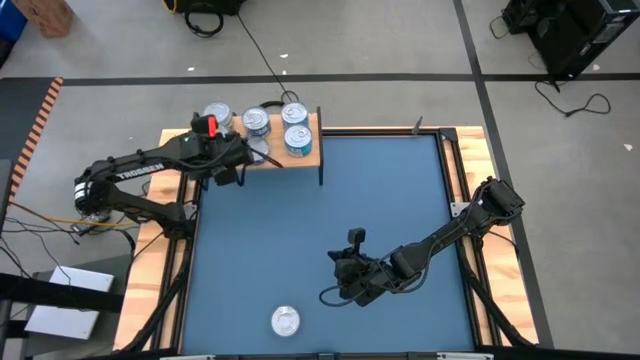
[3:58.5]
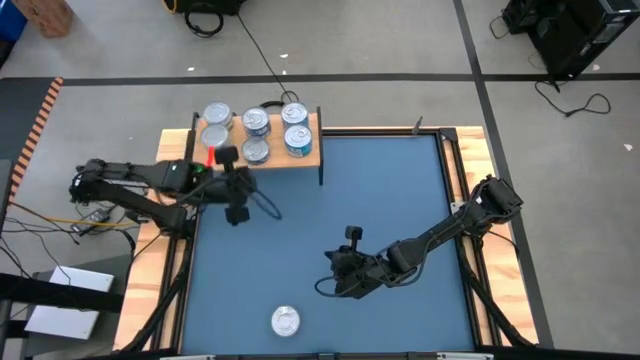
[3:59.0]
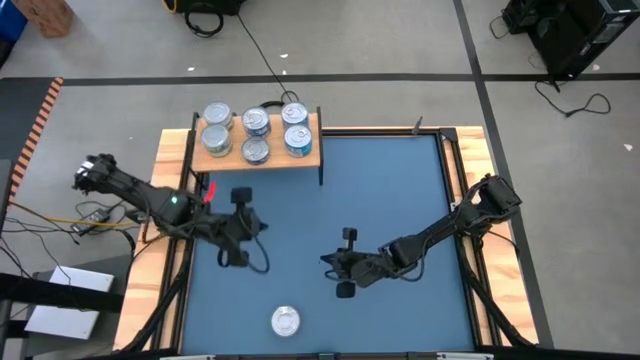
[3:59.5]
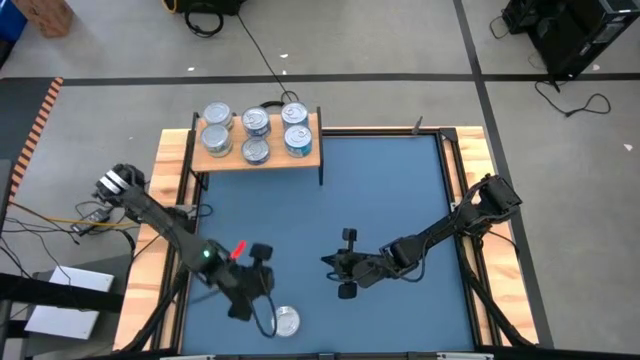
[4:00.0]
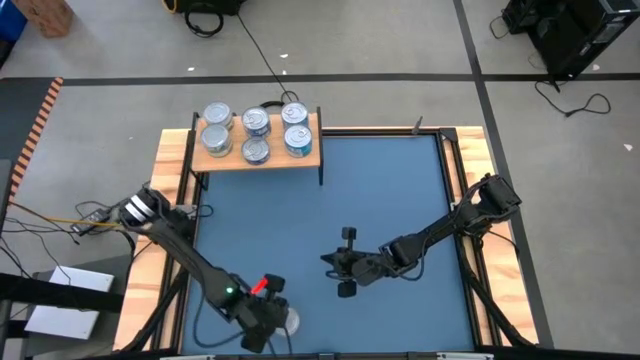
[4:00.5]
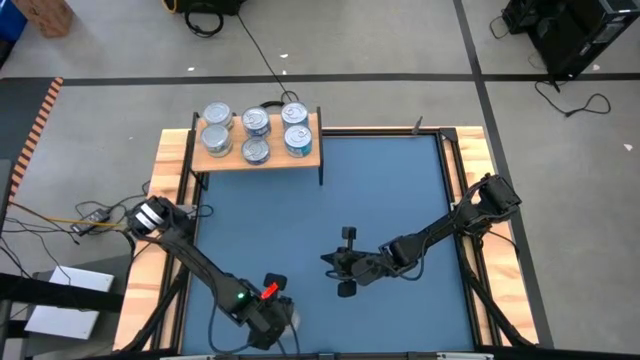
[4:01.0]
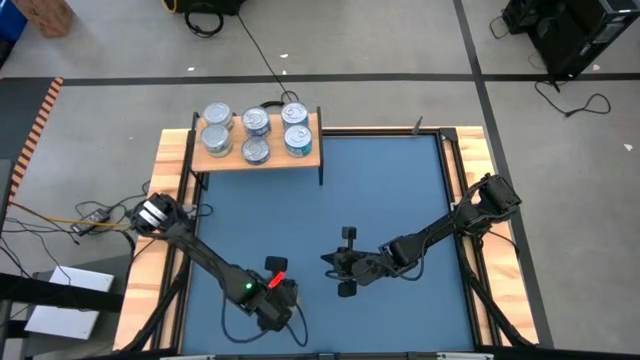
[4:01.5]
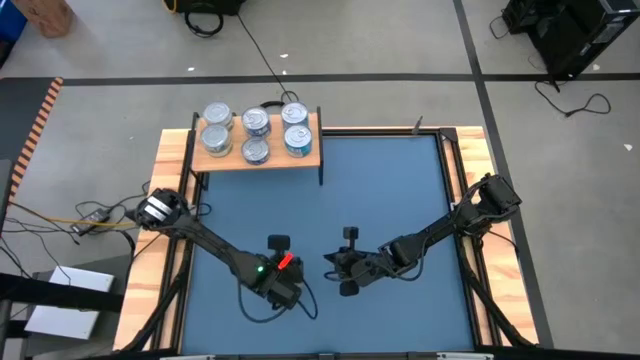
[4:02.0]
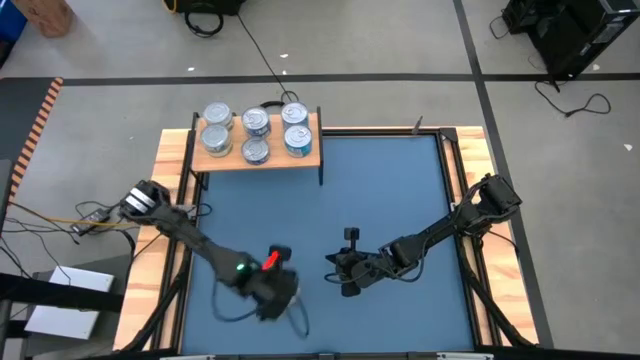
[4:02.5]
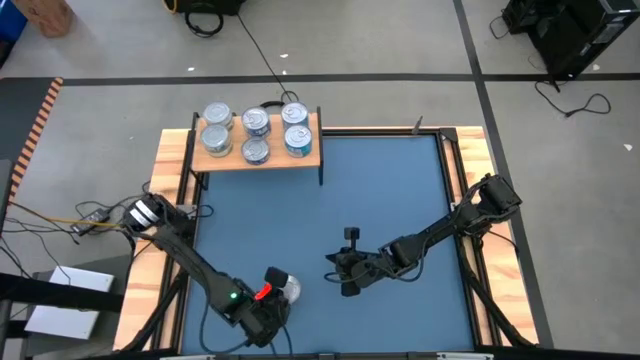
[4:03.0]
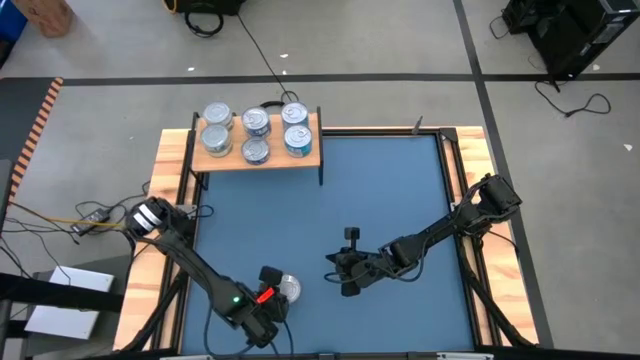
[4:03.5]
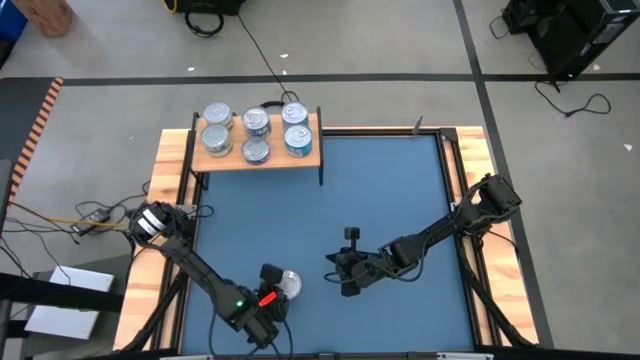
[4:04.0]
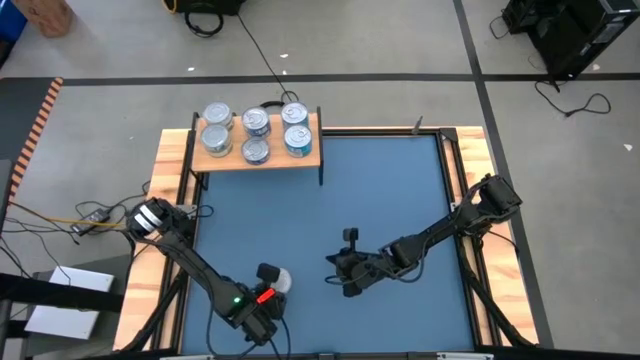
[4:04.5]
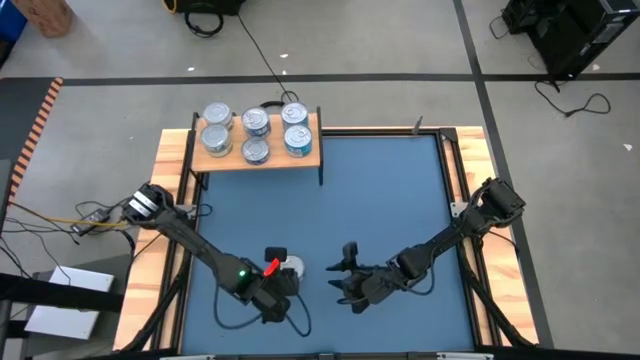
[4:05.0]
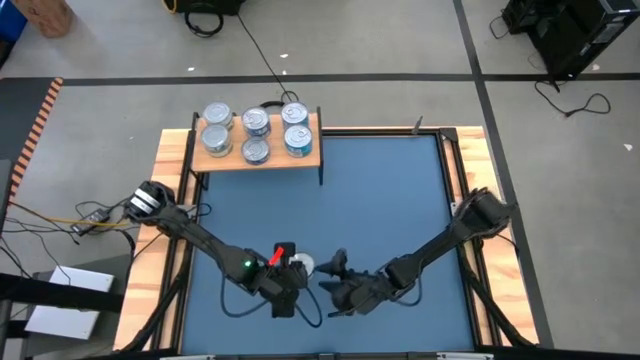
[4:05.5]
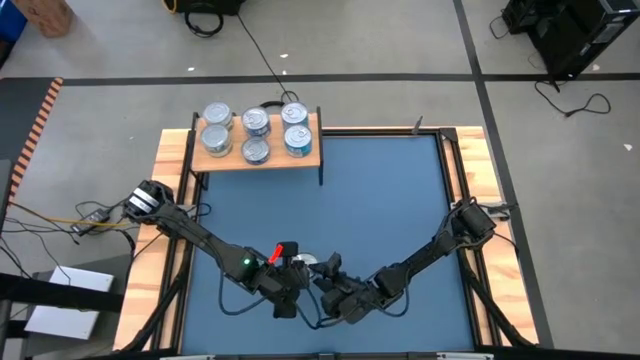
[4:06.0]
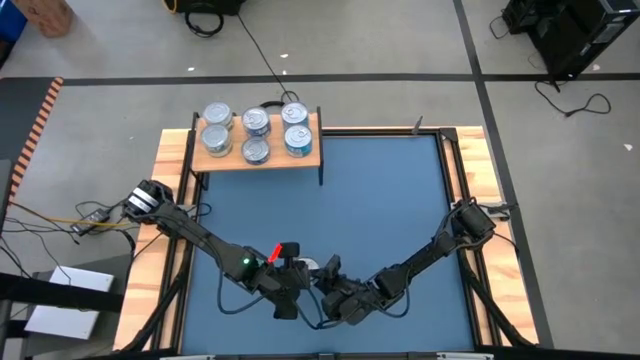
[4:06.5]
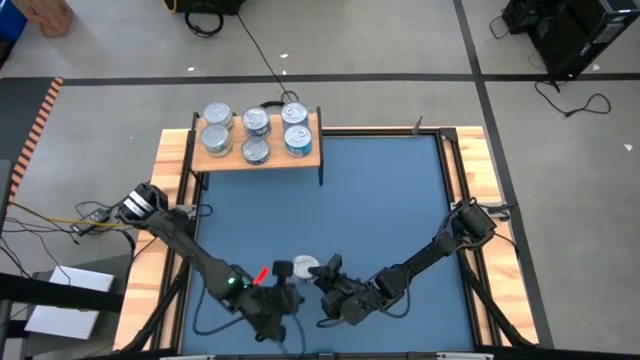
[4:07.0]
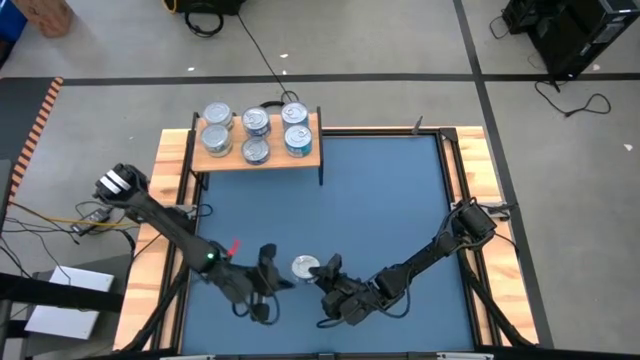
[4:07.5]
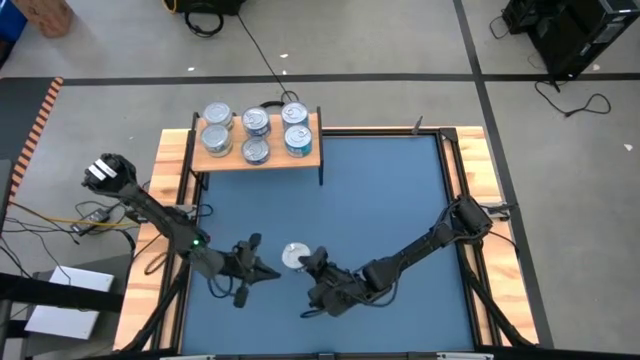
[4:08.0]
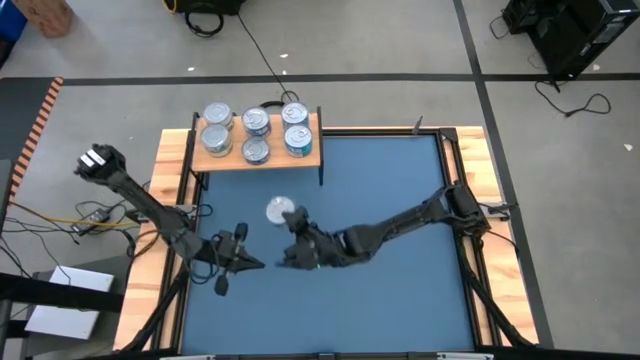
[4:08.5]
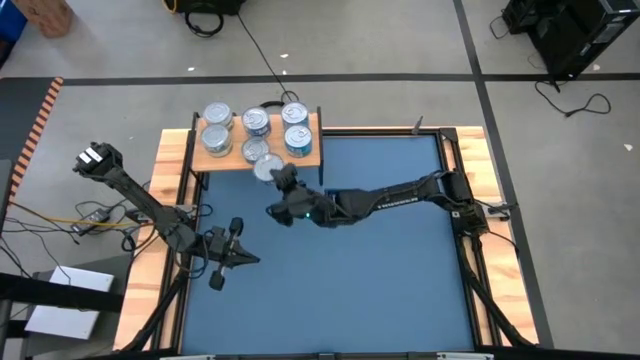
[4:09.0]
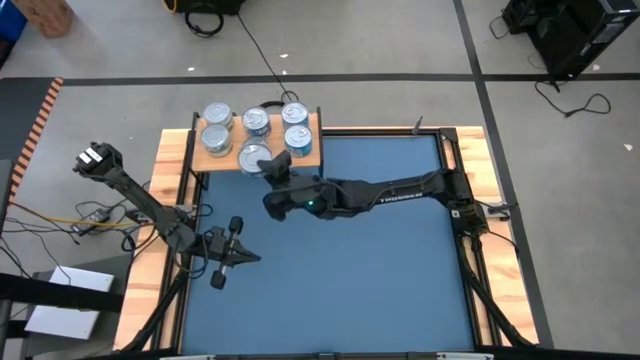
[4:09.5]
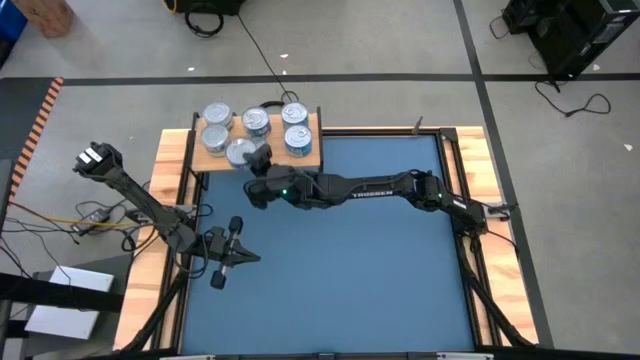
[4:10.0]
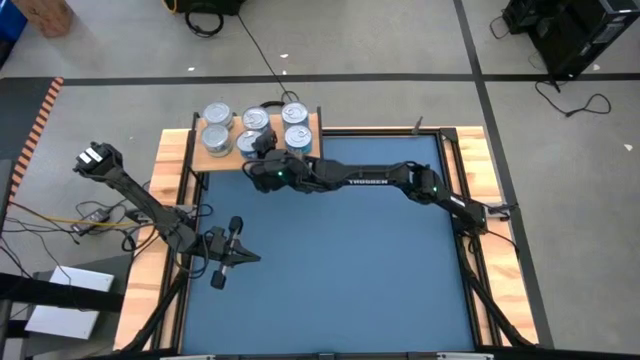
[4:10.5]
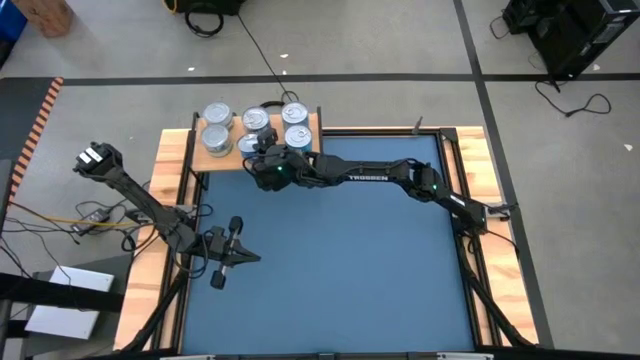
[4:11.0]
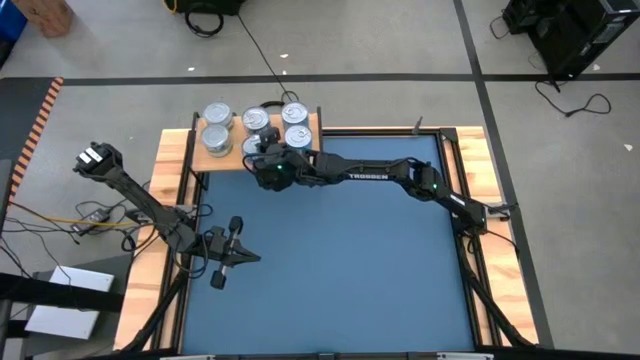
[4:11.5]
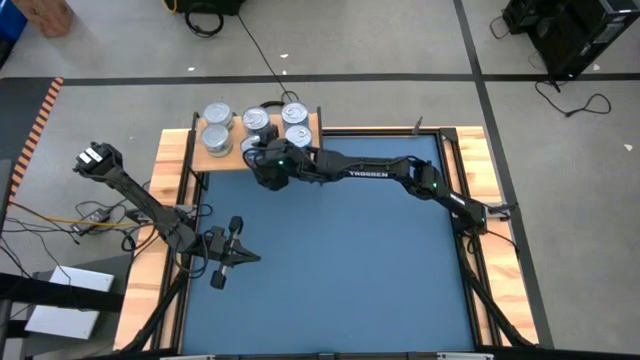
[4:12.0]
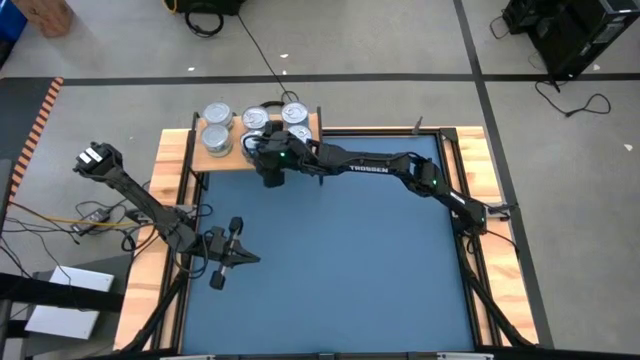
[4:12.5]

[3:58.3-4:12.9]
Task: Stack canned seafood by type on shelf
Stack the blue tuna can on top of the blue tuna can on the shelf

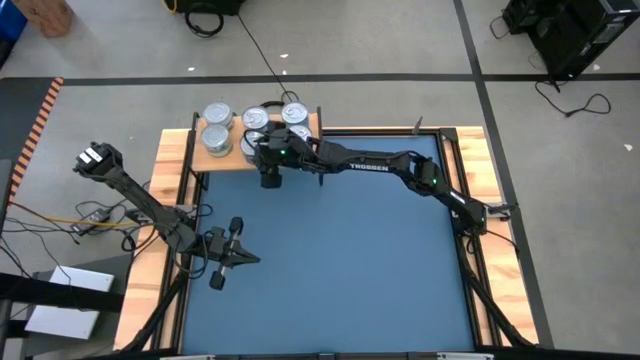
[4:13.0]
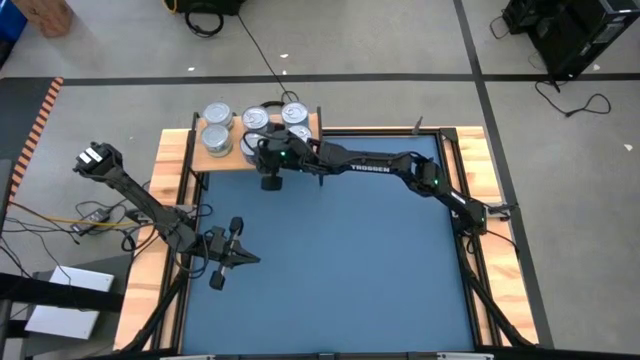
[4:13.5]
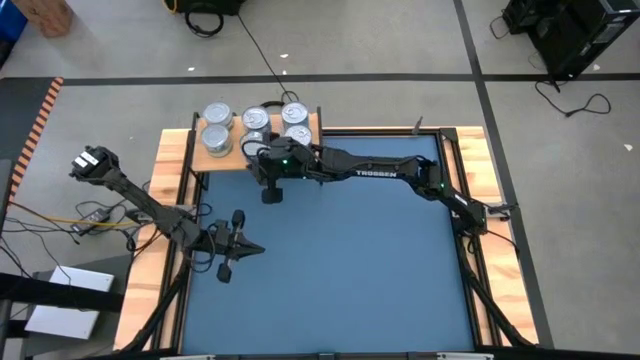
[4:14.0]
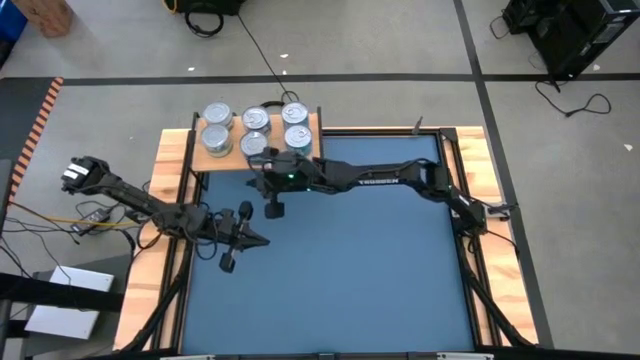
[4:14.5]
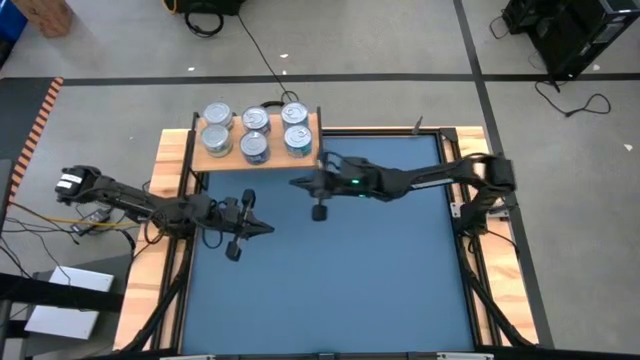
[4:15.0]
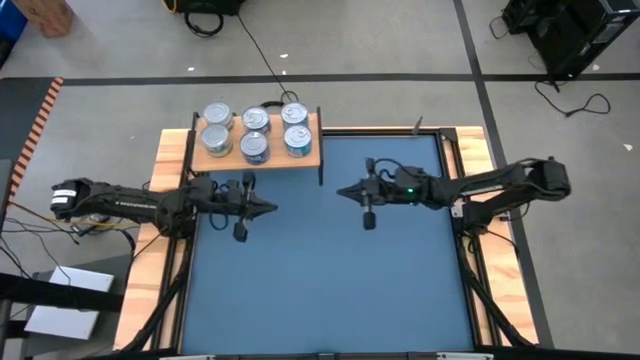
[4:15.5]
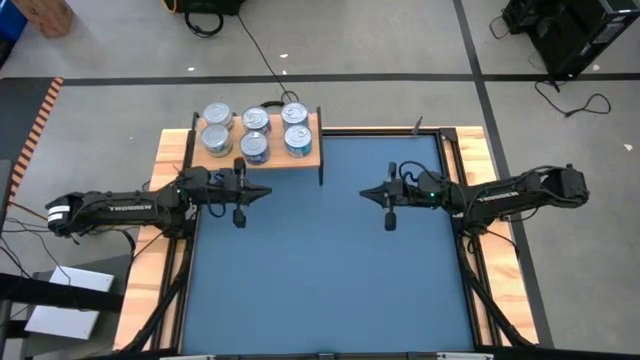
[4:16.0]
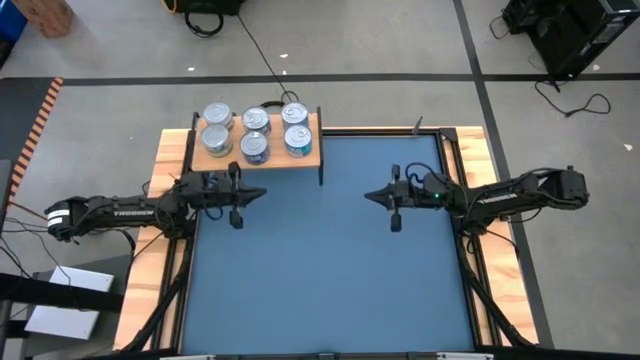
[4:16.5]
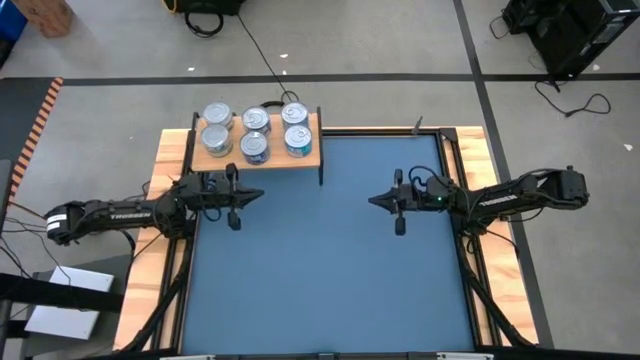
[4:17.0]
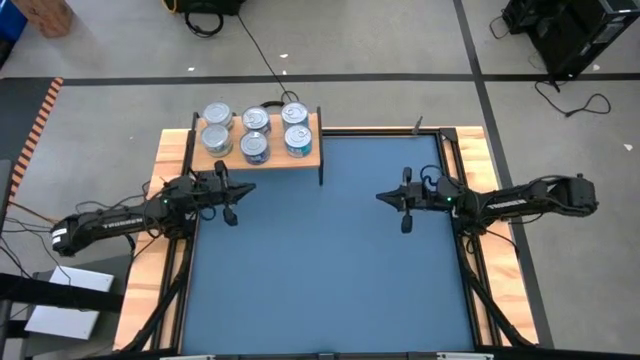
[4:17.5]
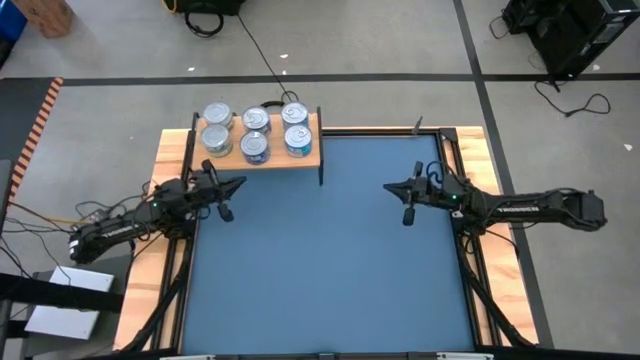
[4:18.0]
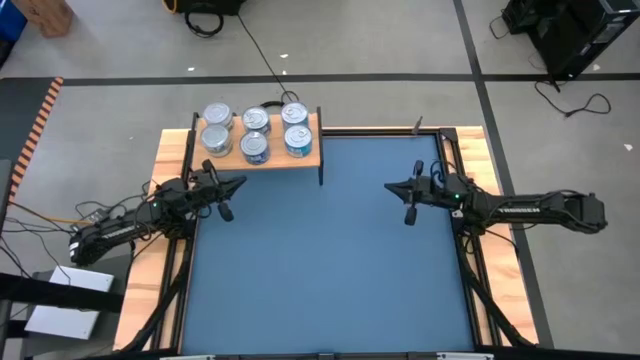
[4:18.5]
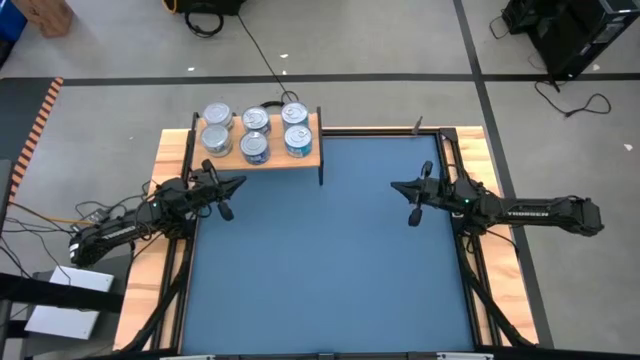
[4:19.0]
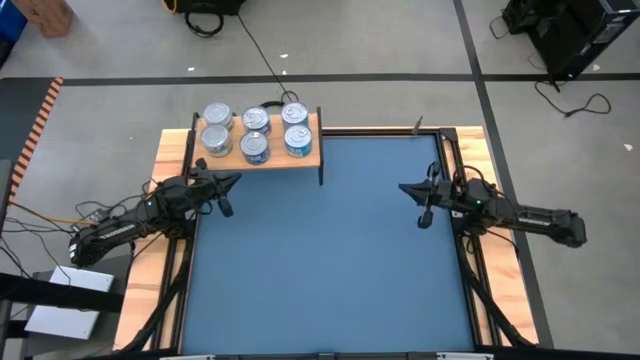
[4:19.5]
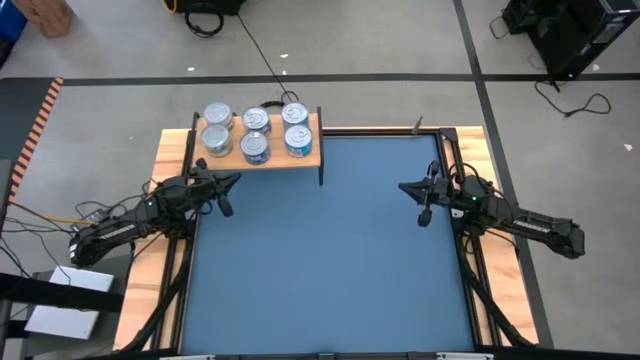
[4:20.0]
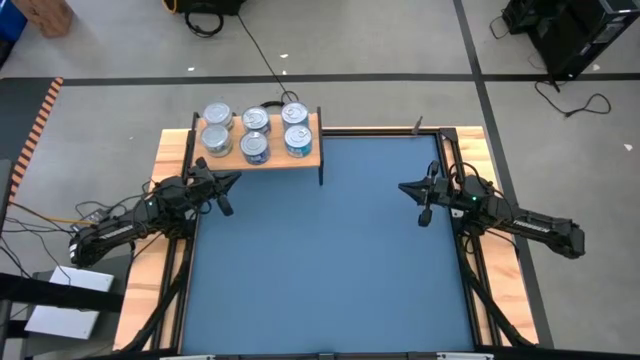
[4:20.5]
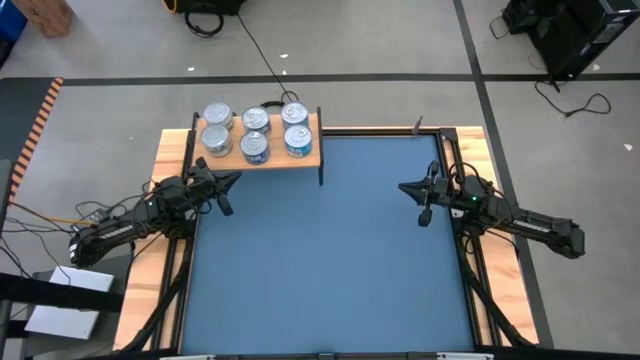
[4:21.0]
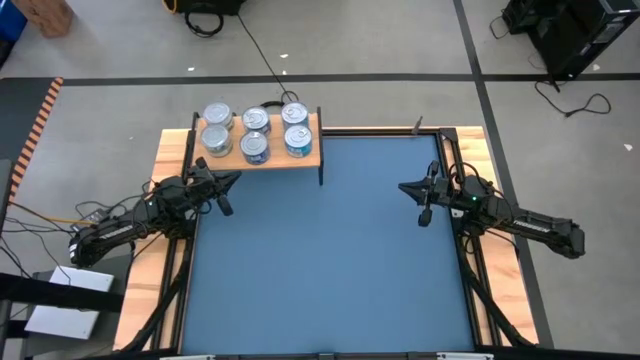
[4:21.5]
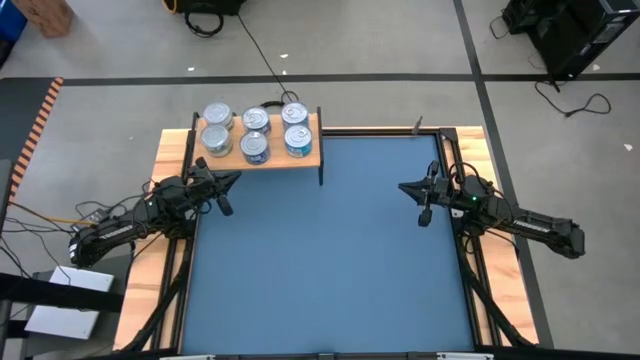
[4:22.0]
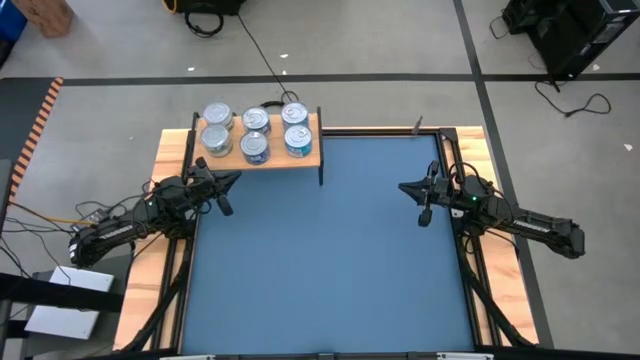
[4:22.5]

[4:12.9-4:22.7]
Return to Home Position
